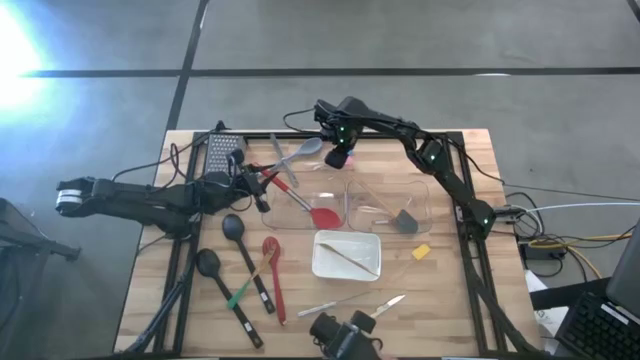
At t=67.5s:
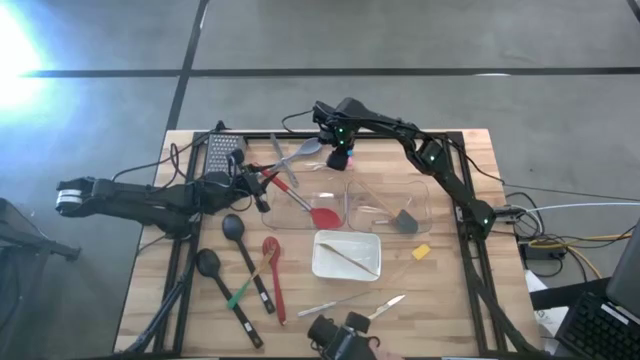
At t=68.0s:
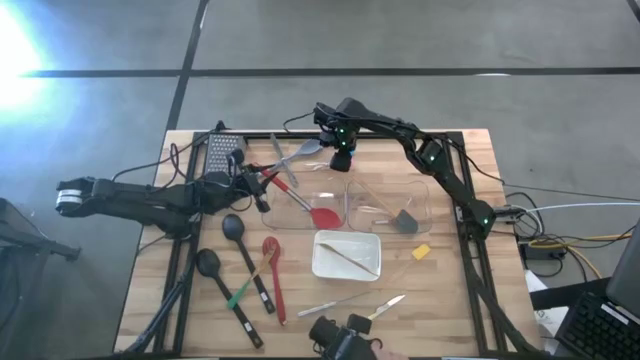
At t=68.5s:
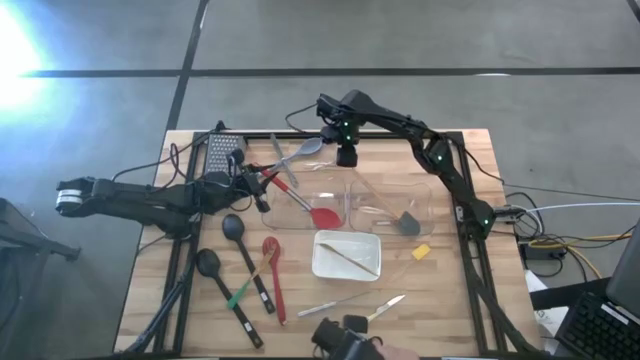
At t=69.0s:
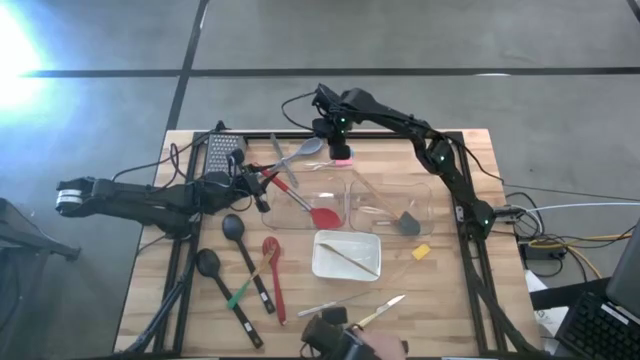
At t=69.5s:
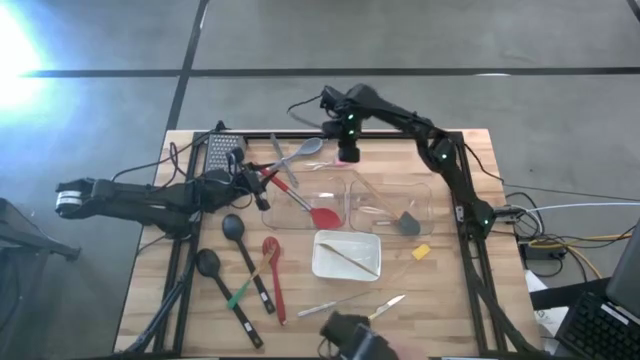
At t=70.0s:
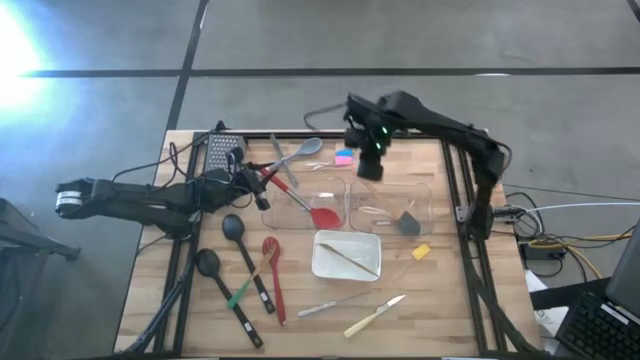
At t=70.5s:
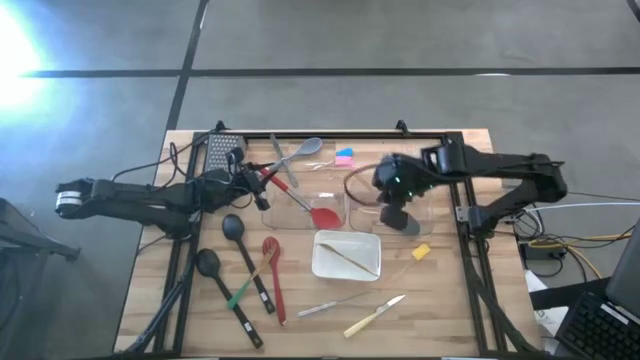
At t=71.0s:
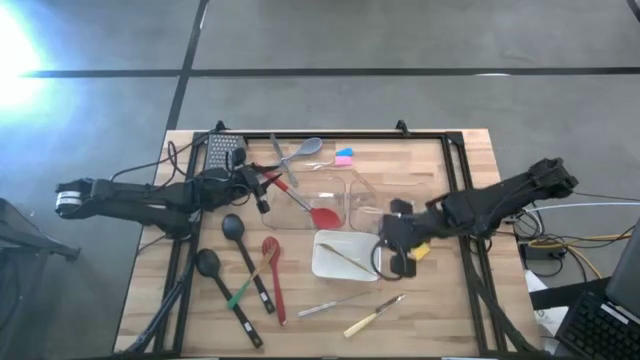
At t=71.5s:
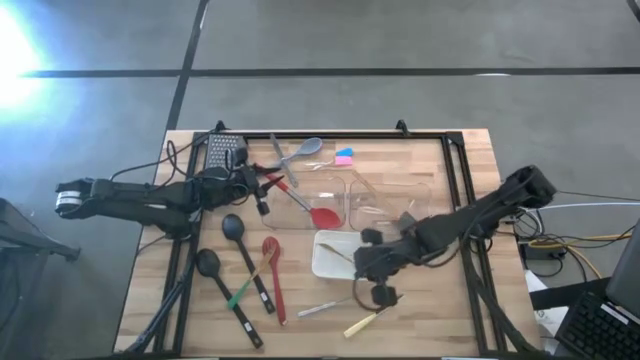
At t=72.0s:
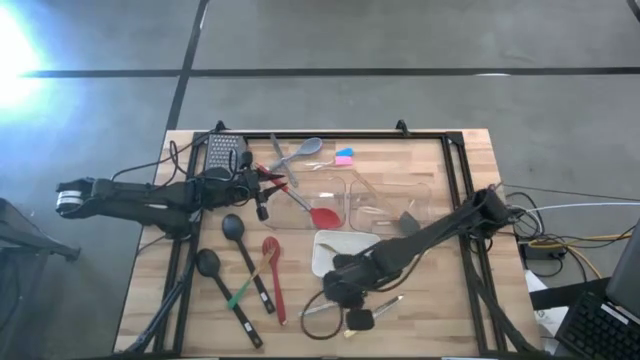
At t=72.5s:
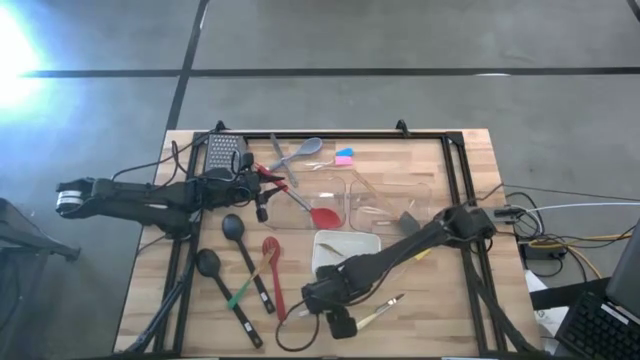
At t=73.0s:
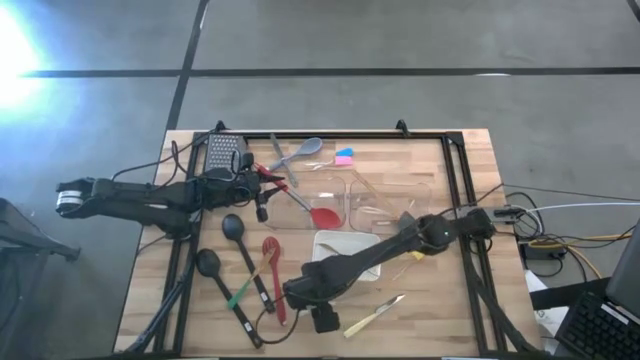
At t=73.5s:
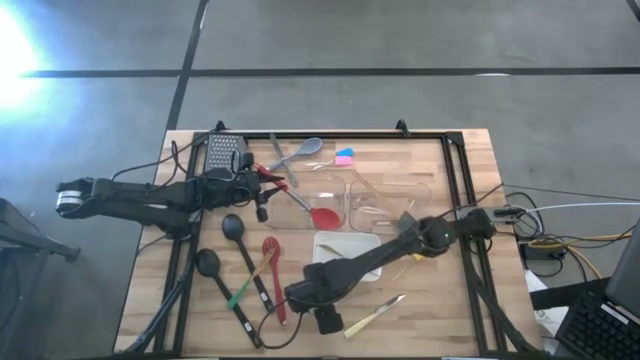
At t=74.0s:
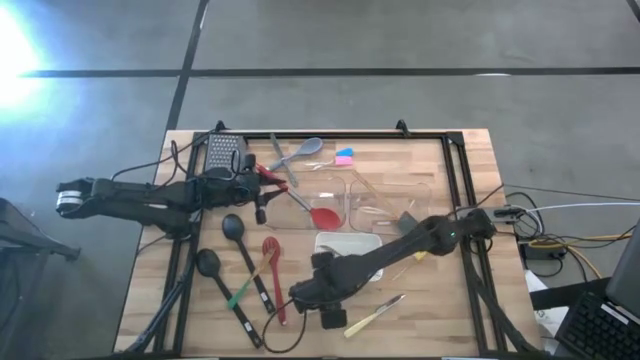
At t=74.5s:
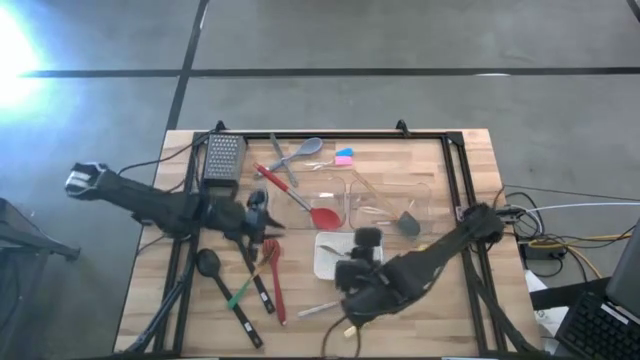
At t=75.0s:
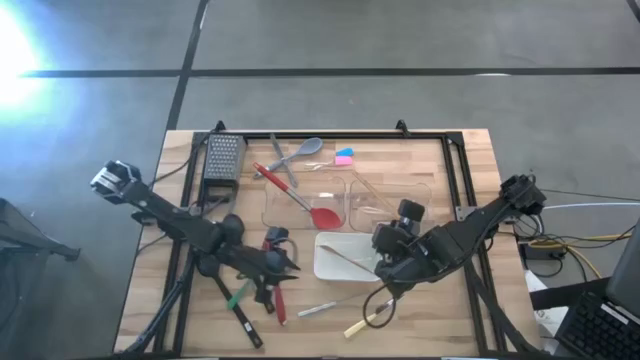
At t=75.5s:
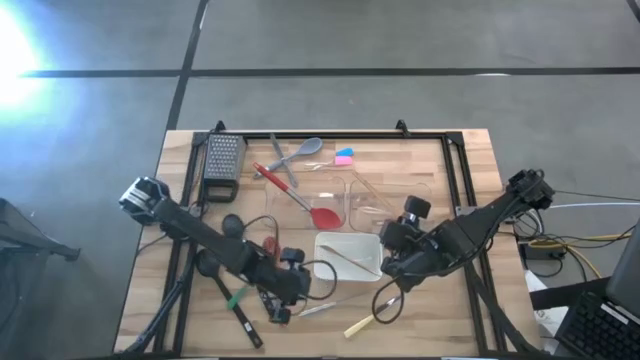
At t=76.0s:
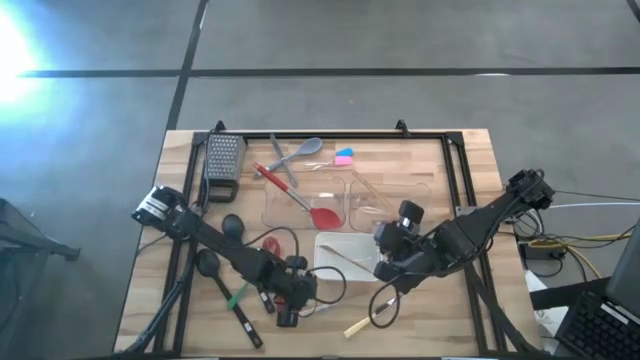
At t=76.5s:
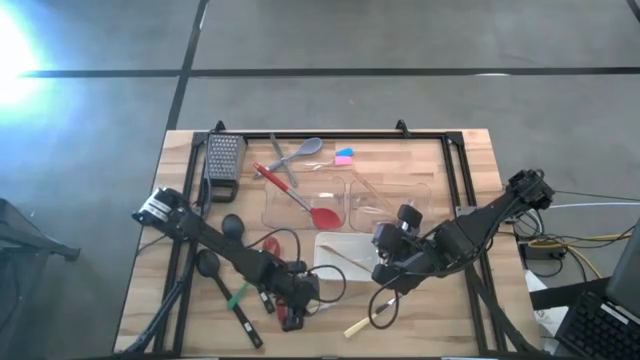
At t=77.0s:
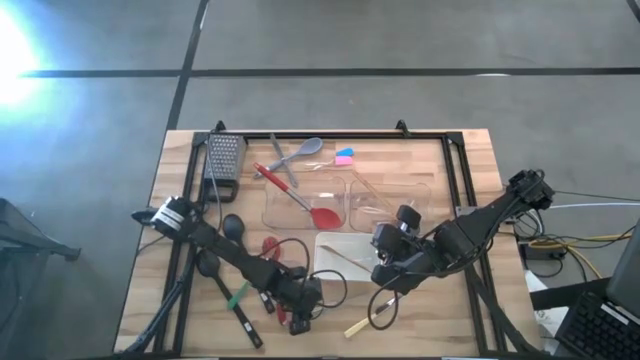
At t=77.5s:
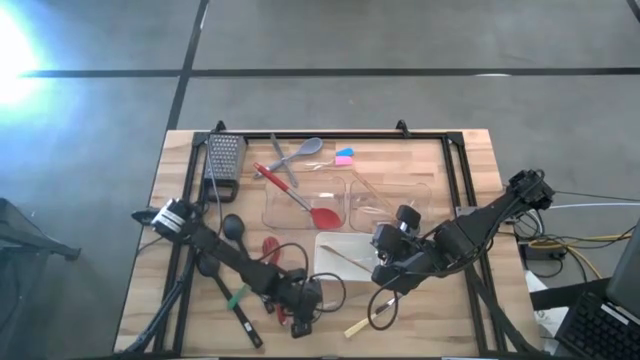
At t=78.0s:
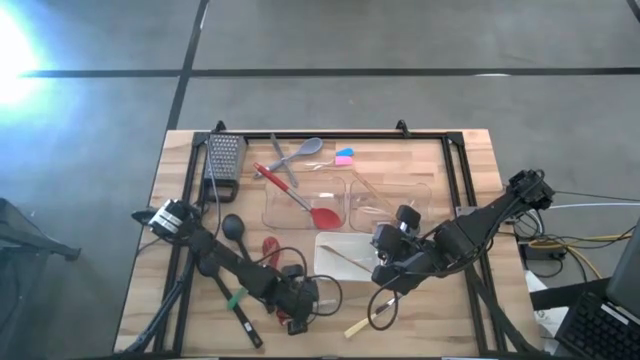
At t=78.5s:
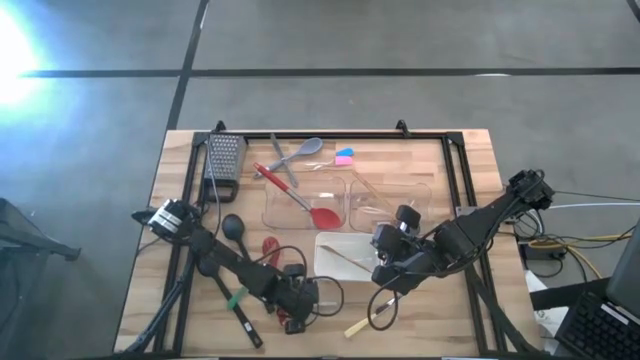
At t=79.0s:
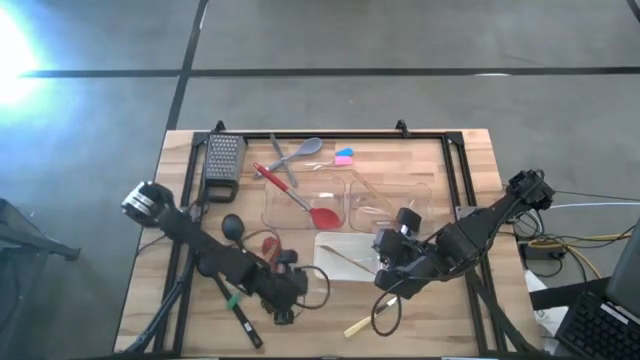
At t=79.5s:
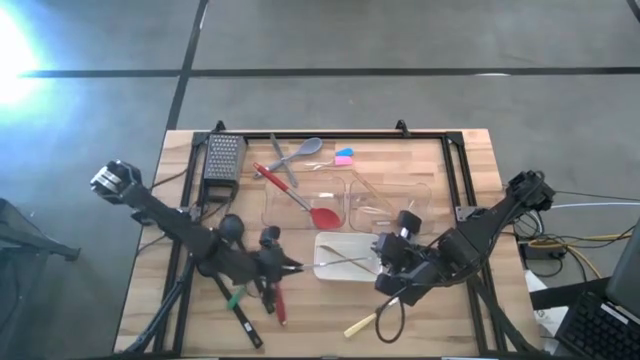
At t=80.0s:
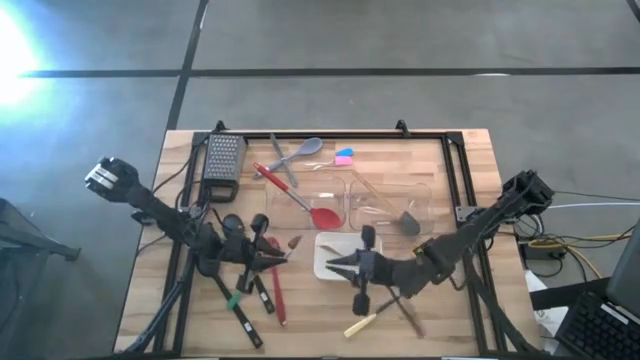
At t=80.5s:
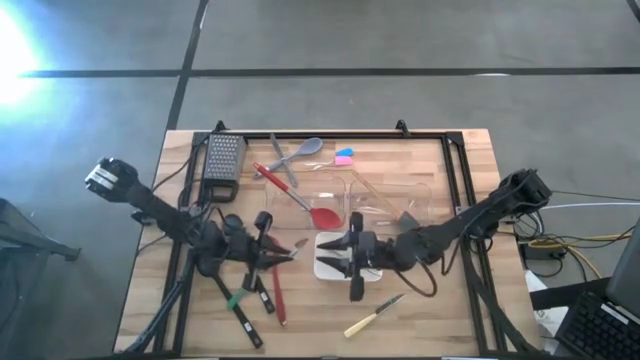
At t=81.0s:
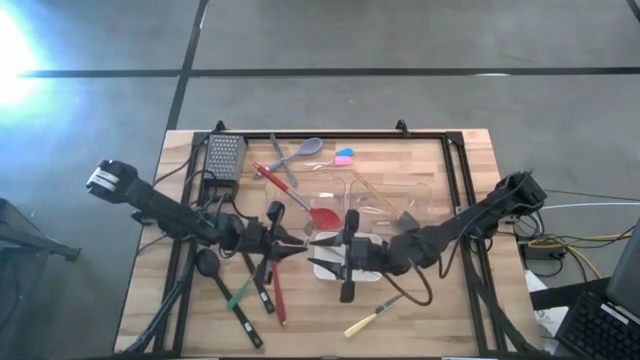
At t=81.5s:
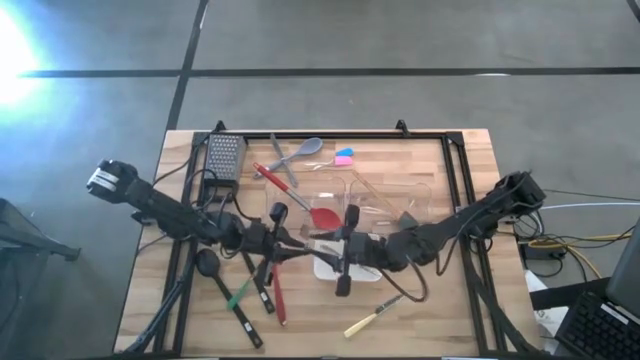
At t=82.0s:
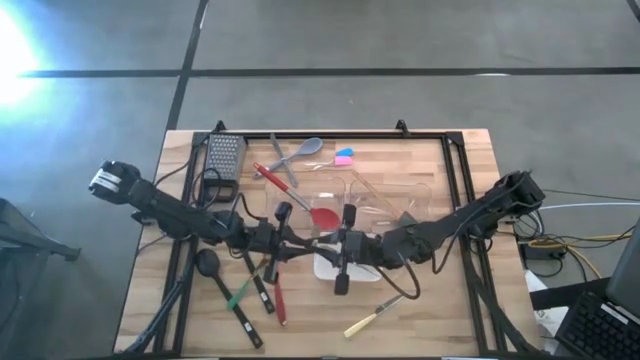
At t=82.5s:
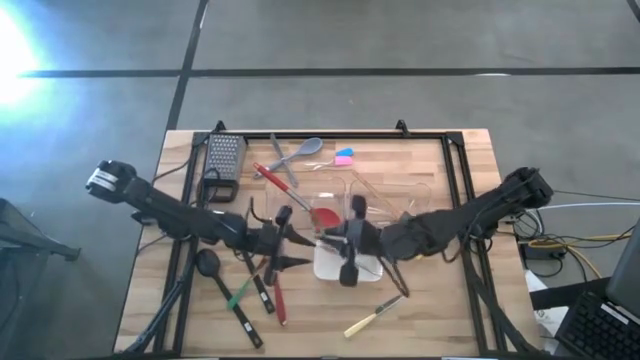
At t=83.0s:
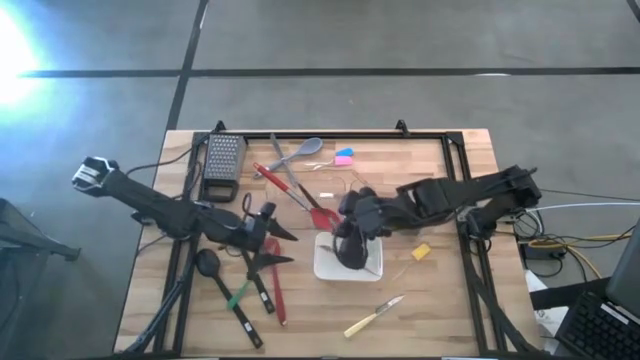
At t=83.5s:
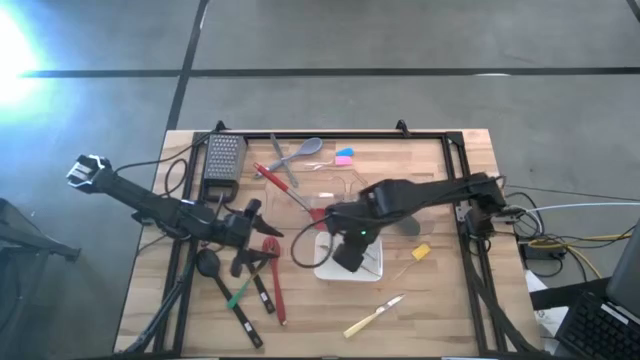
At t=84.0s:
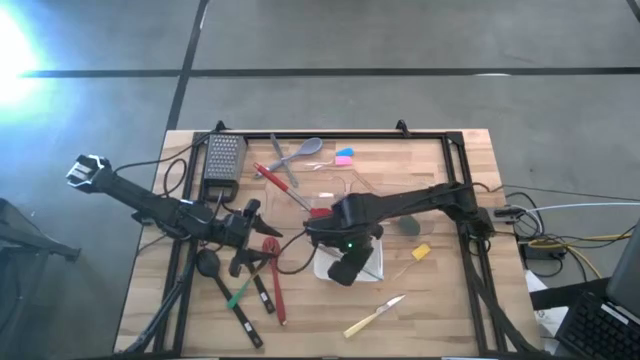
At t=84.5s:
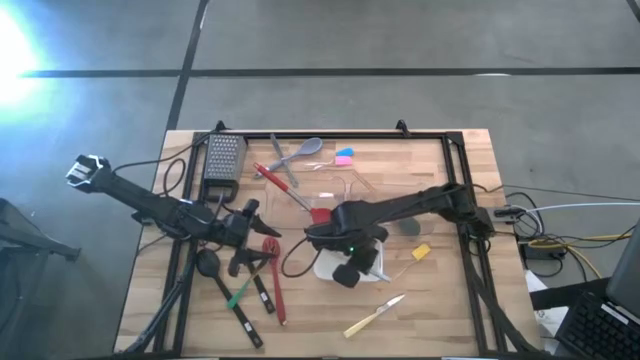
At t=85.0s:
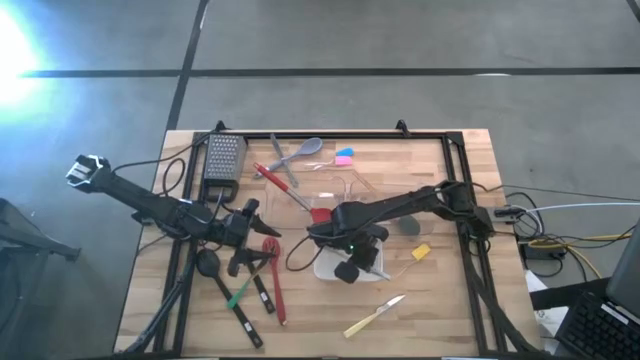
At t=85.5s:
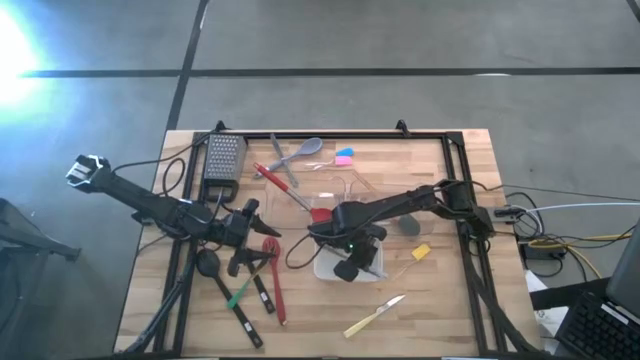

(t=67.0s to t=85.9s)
Task: Pick & Place Kitchen Items
Put the white knife into the white bin

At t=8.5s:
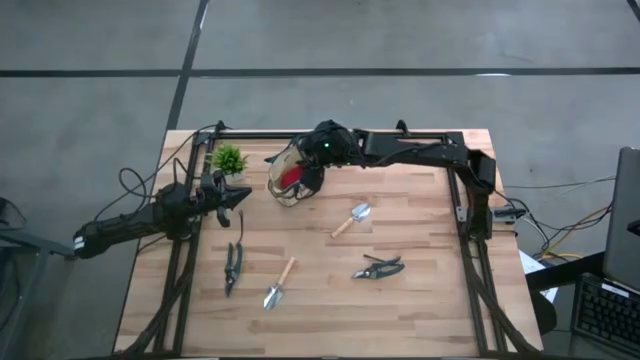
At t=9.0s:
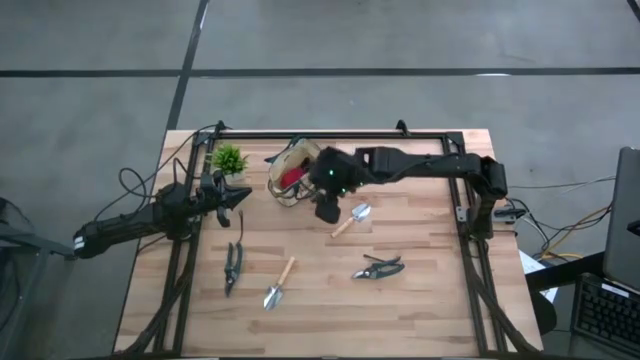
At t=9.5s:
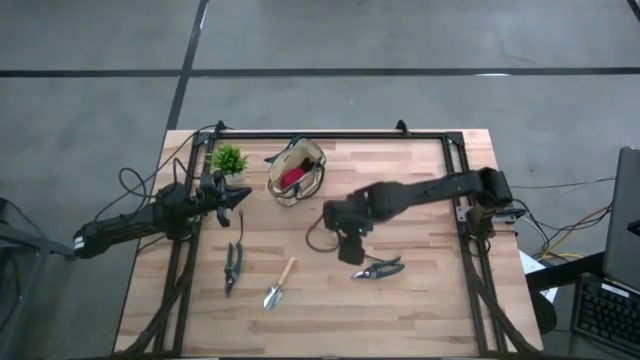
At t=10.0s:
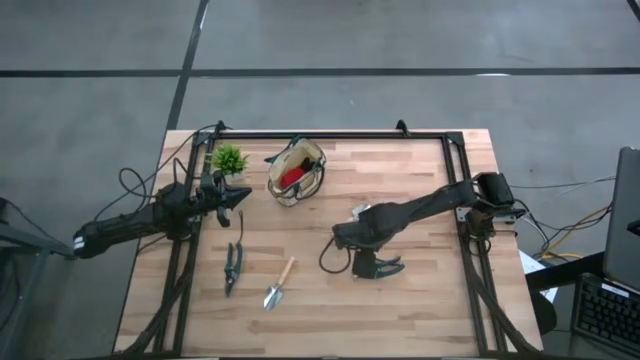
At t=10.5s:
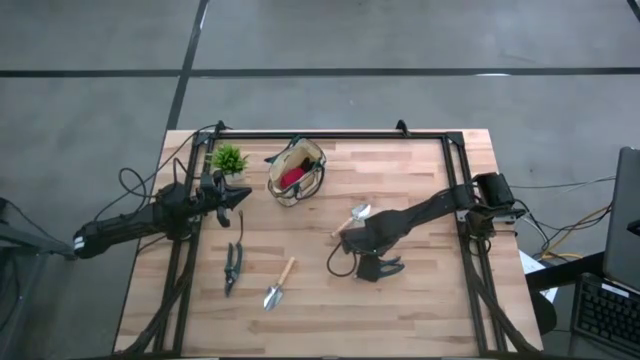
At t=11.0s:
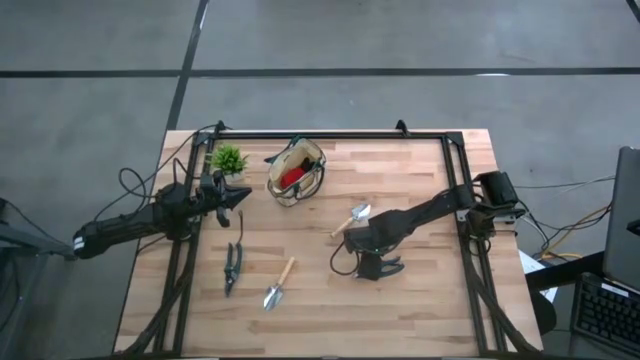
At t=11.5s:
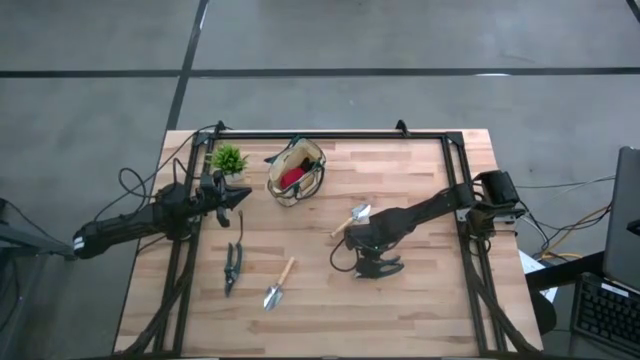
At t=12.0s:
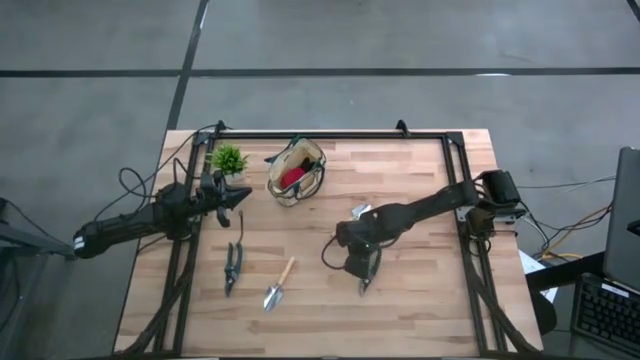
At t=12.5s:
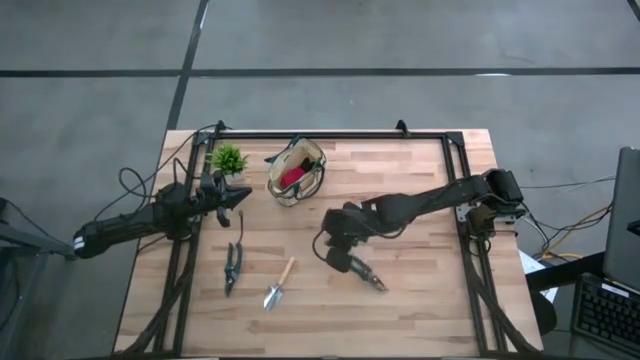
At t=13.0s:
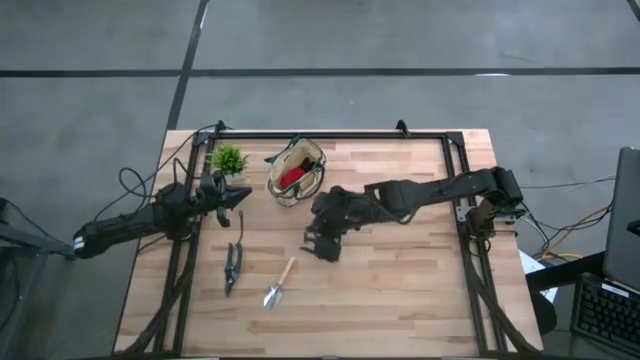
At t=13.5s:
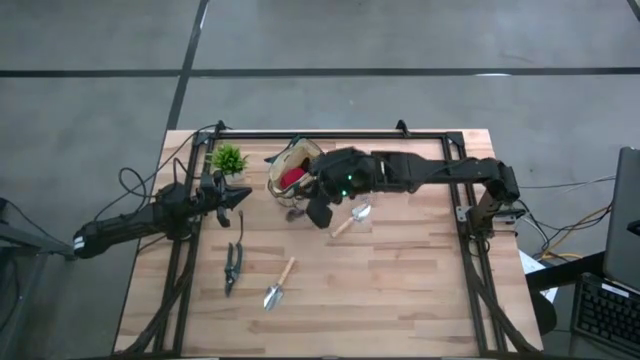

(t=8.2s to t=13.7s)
Task: Pick & Place Garden tools in Gardening bag
Put the right green shear scissor into the green gardening bag
